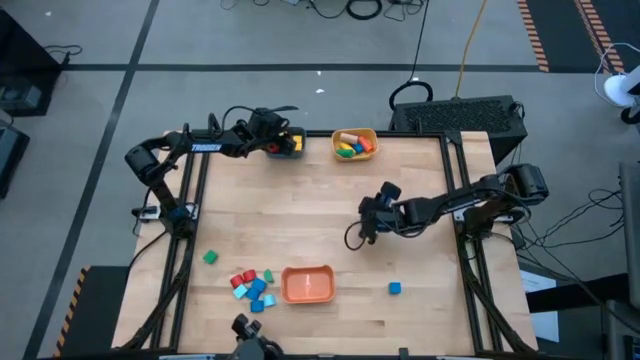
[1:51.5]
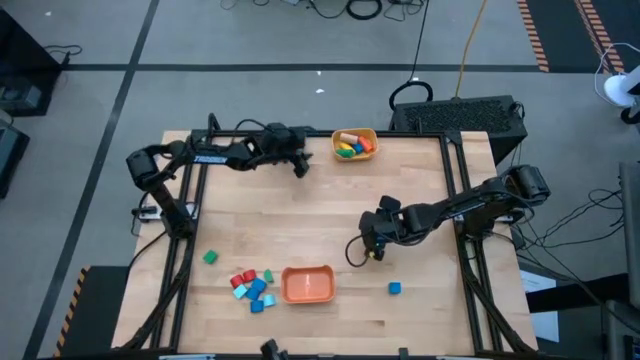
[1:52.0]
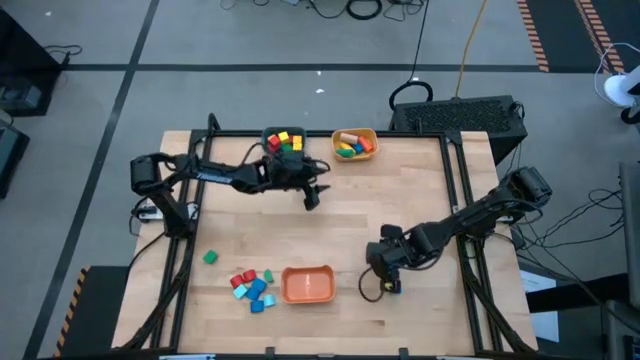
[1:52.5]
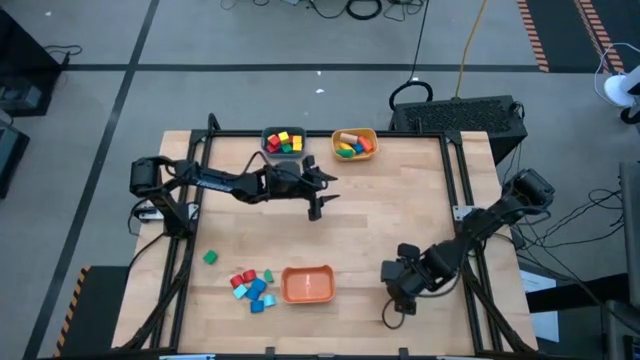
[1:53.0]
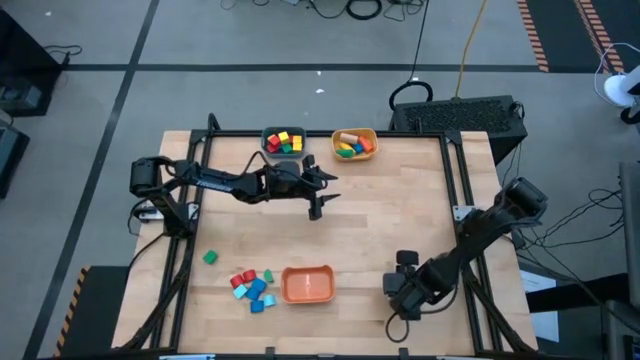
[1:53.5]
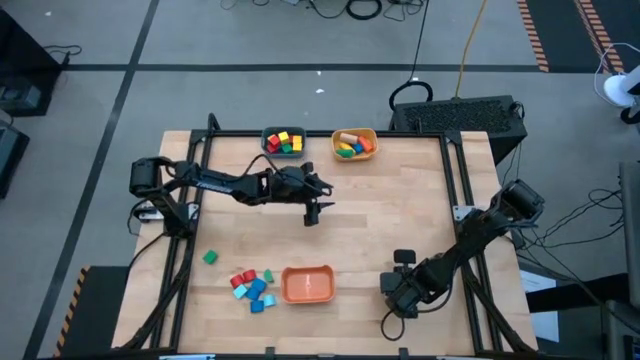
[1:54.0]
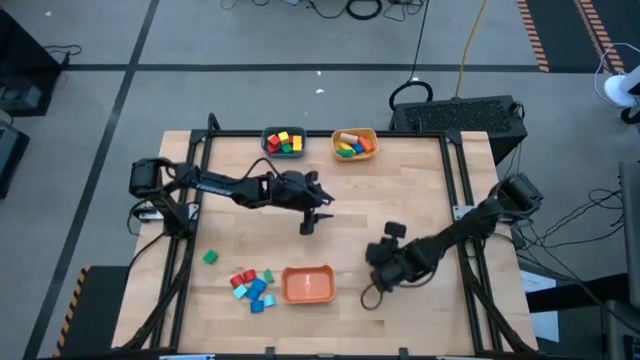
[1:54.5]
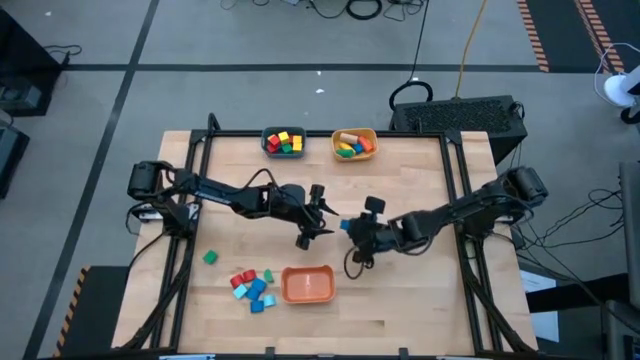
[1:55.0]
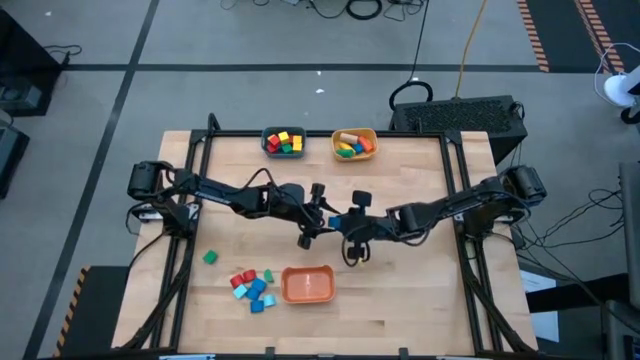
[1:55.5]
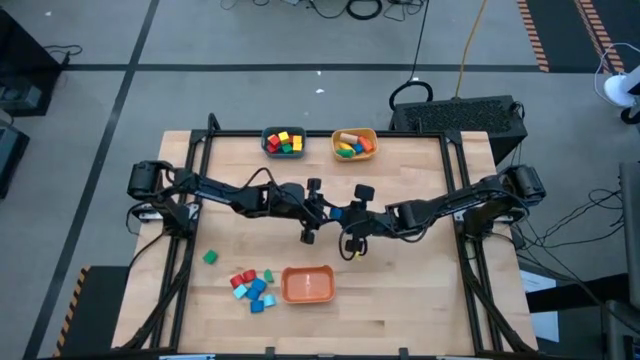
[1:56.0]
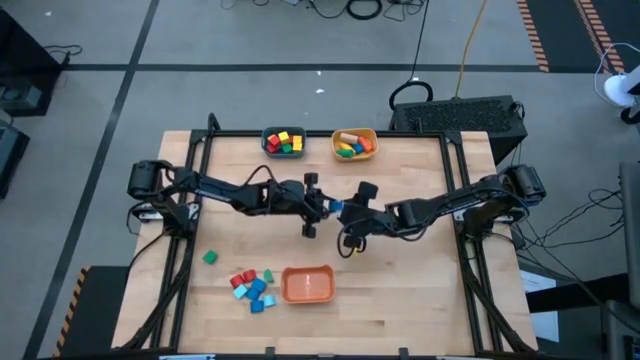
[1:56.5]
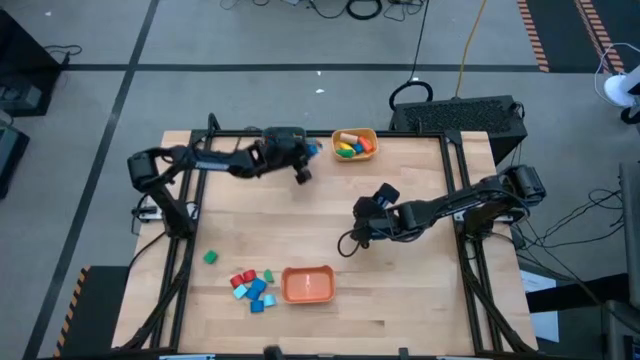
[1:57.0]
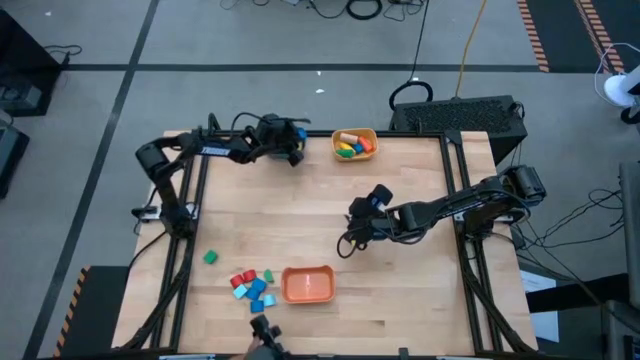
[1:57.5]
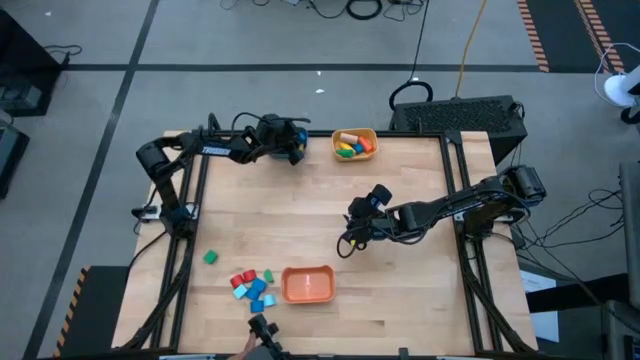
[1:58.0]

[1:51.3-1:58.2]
Task: Sort blocks by size
Put the blue square block into the blue bin

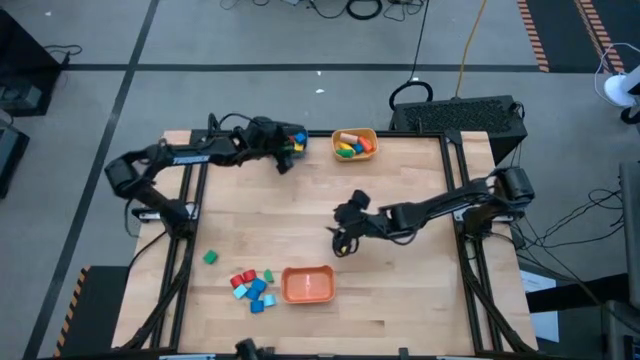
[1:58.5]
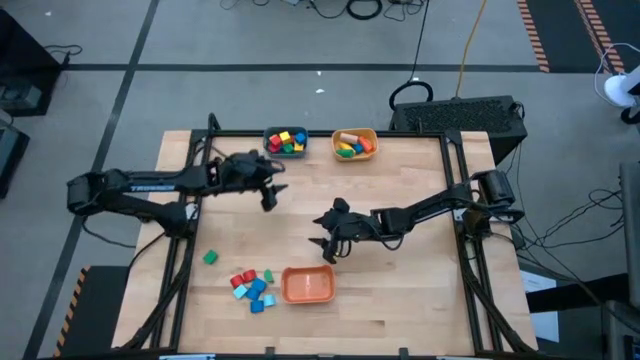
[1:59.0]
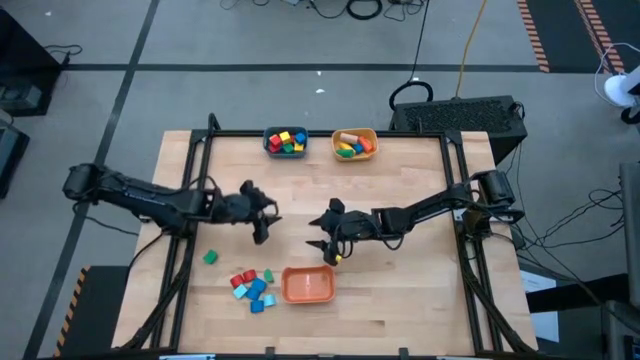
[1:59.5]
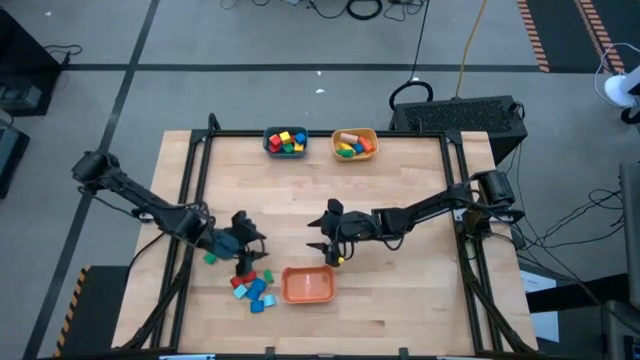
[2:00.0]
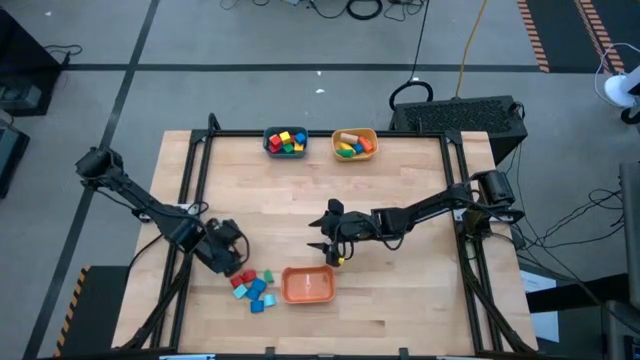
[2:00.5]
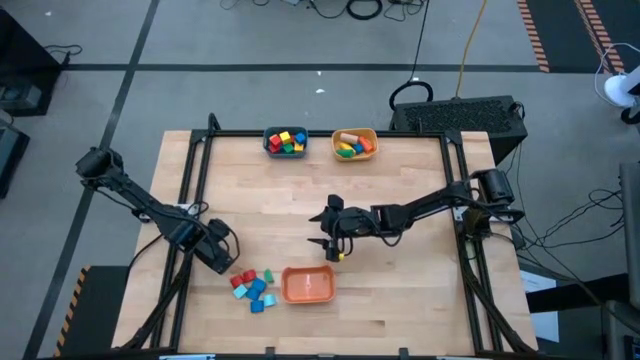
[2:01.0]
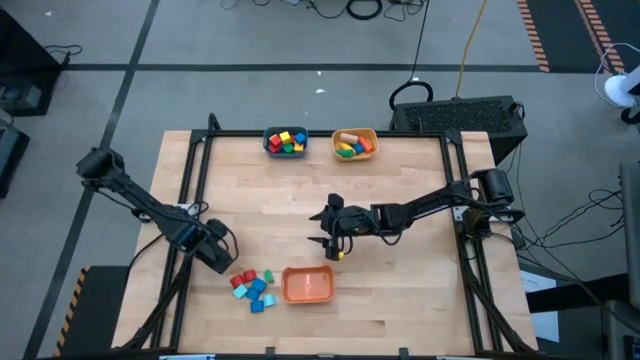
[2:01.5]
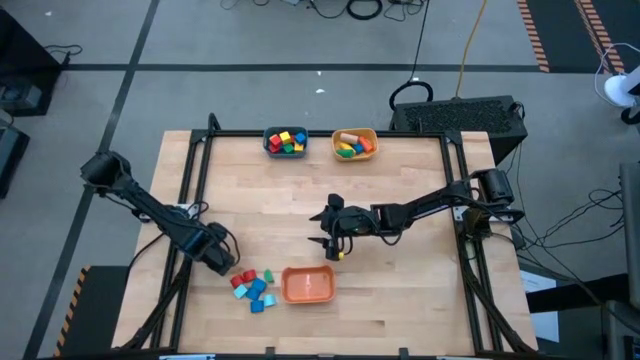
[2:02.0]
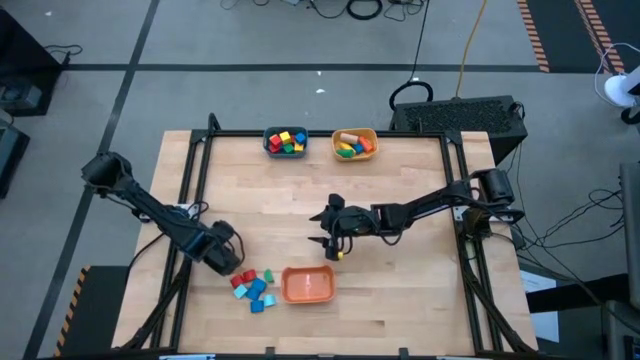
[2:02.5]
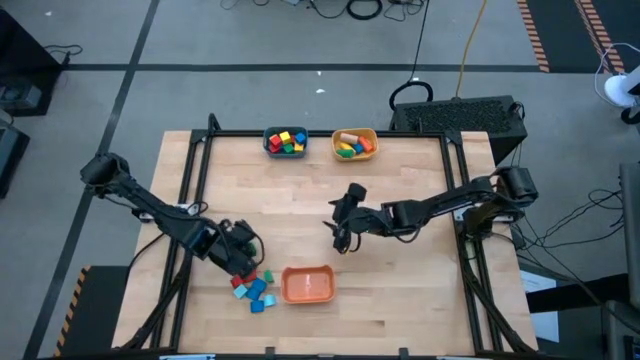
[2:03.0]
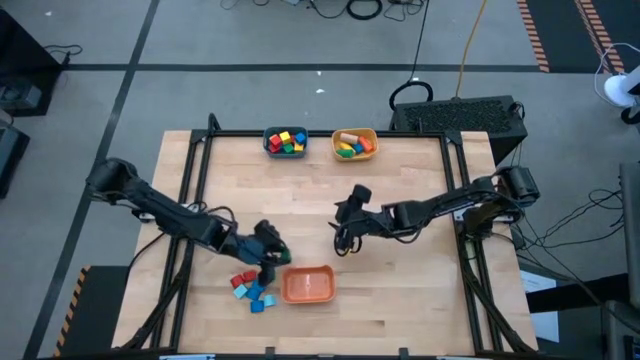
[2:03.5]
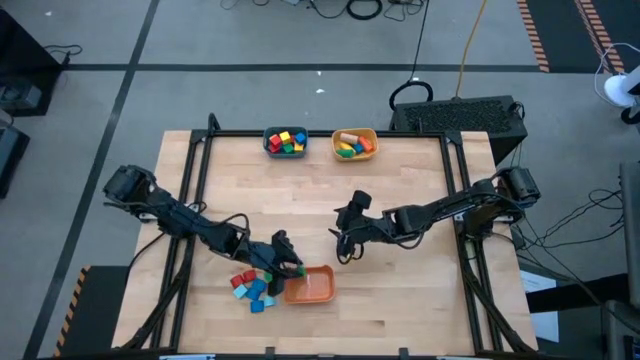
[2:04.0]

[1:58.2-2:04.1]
Put the green half circle block into the orange bin

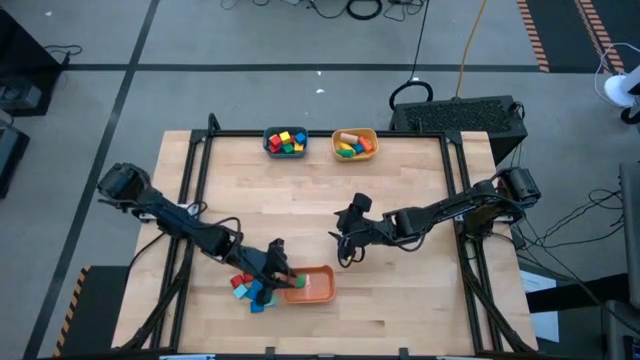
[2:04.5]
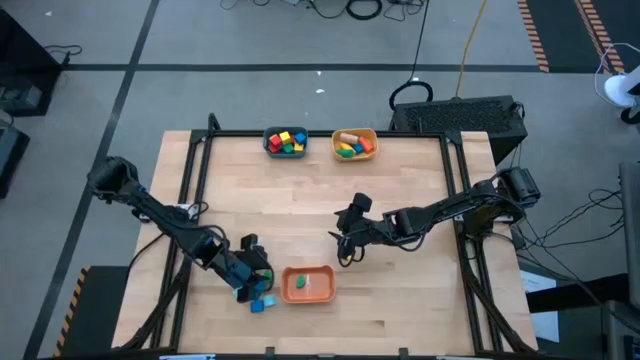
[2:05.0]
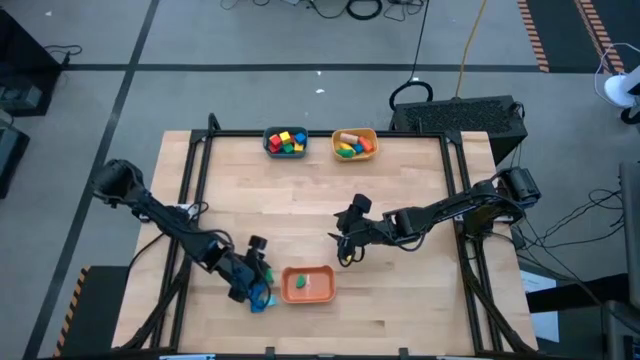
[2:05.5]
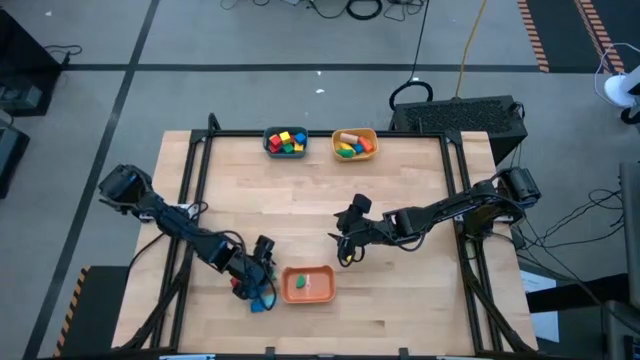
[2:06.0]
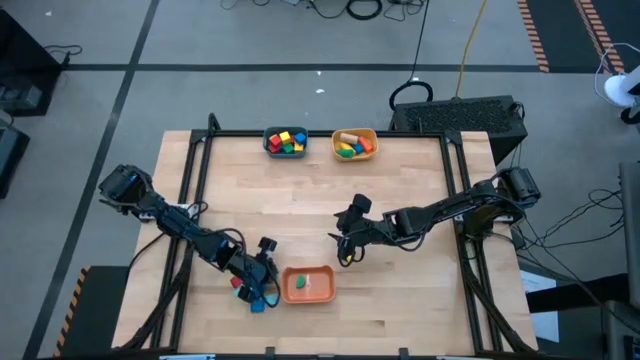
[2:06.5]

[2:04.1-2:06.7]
Put the green half circle block into the orange bin

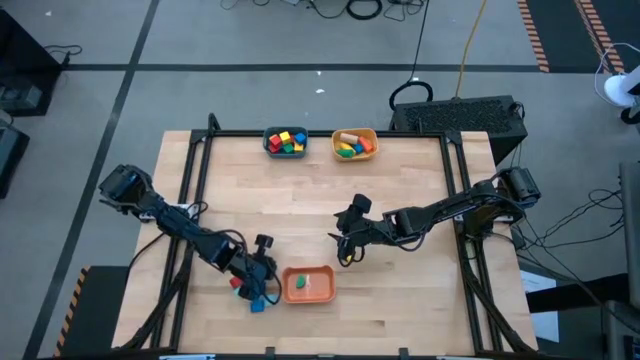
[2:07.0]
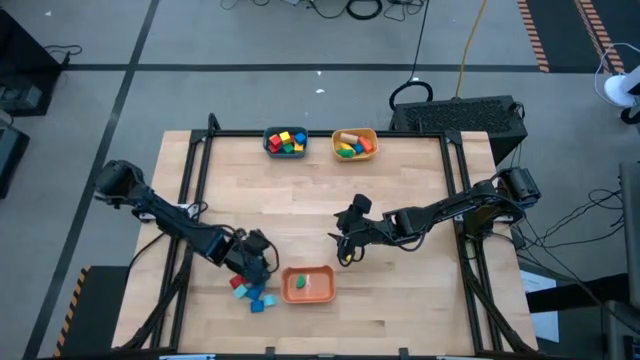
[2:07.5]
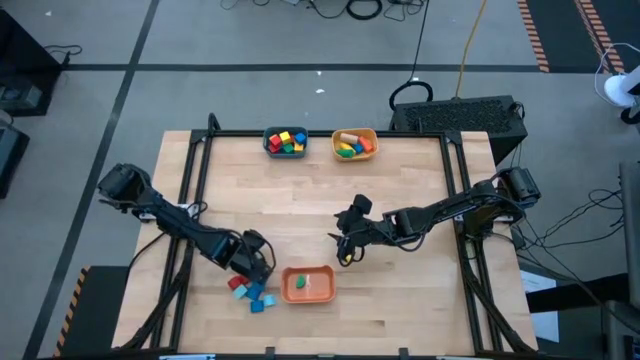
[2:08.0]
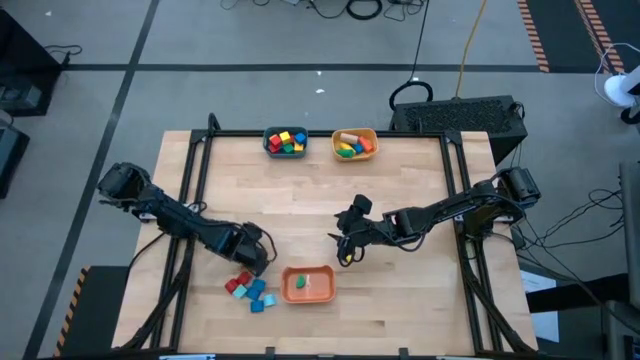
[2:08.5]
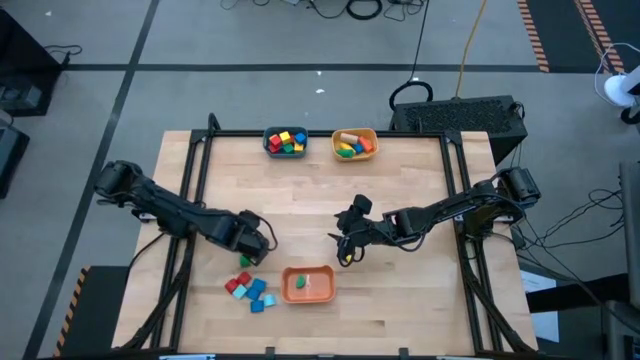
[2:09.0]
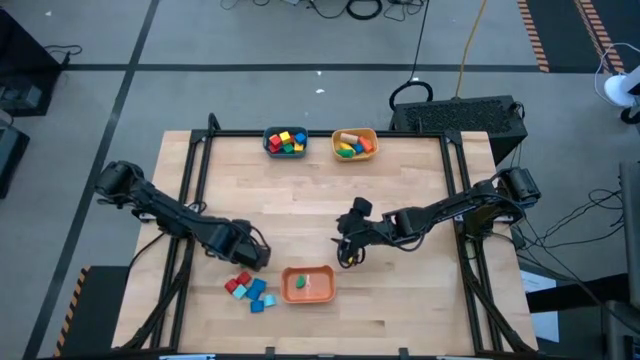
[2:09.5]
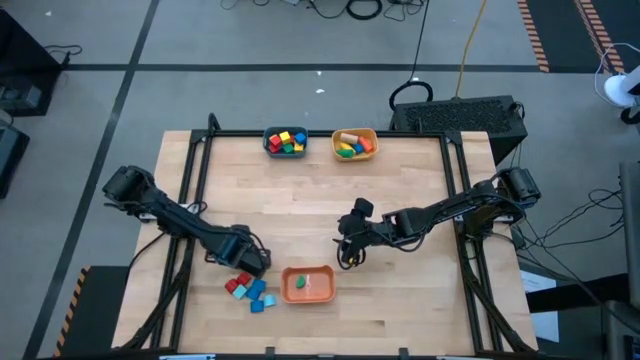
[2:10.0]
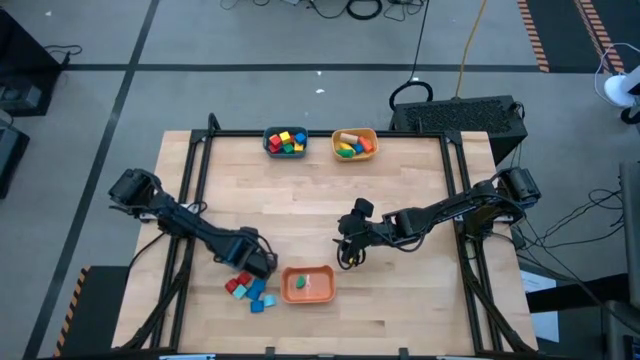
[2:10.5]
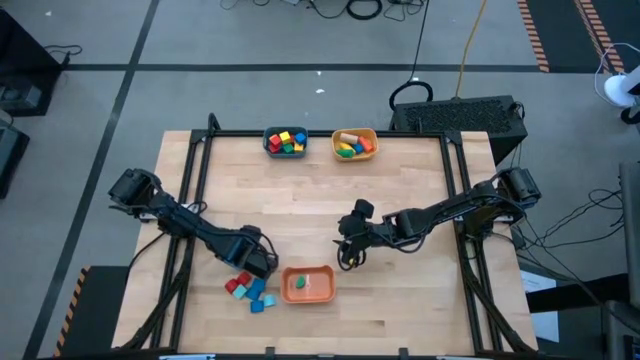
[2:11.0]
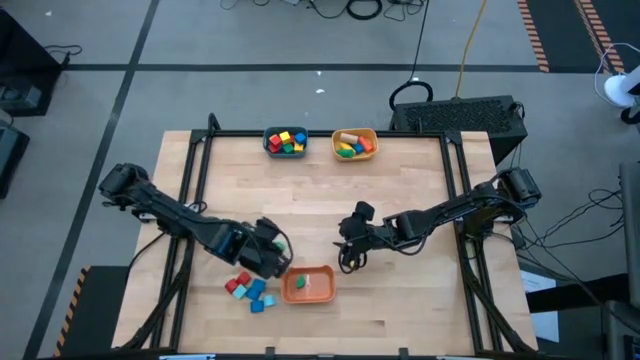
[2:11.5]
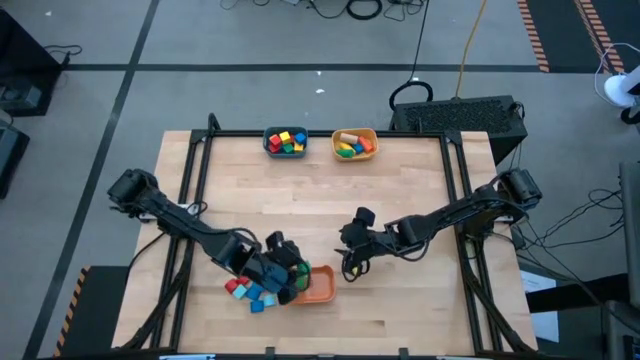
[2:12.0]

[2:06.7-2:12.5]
Put the green half circle block into the orange bin
